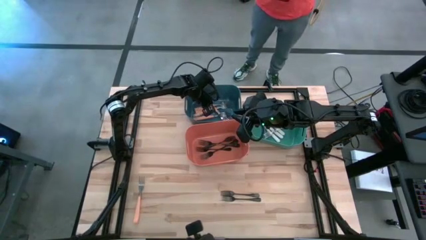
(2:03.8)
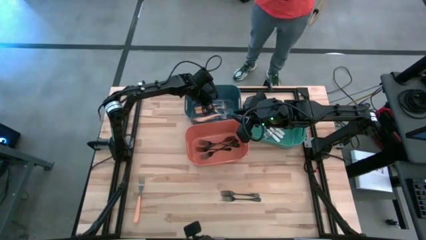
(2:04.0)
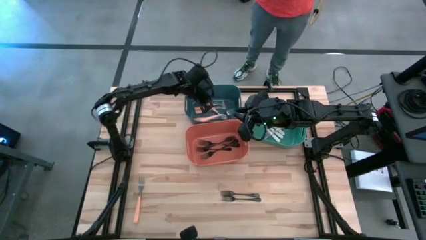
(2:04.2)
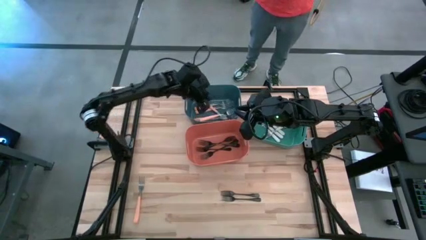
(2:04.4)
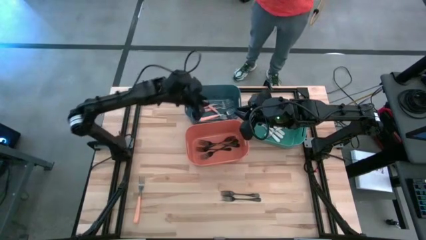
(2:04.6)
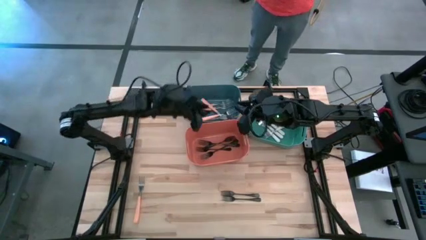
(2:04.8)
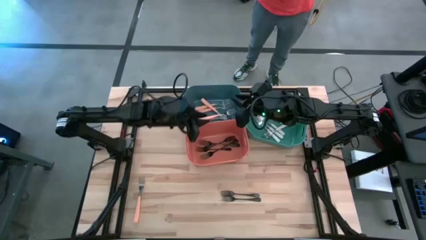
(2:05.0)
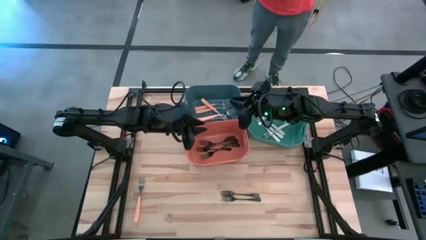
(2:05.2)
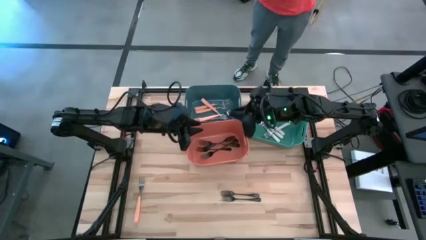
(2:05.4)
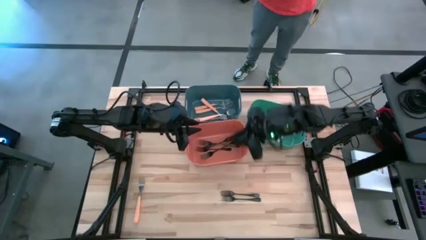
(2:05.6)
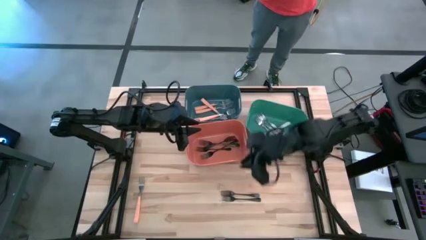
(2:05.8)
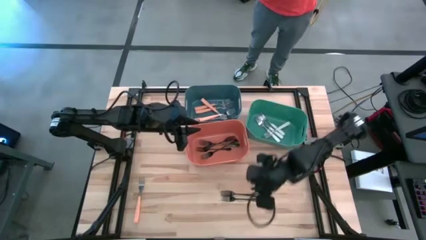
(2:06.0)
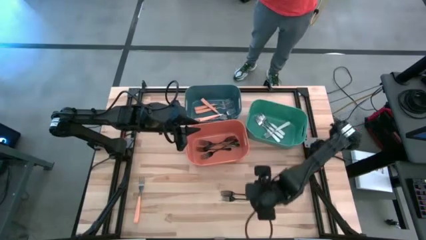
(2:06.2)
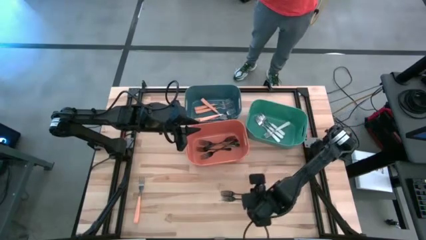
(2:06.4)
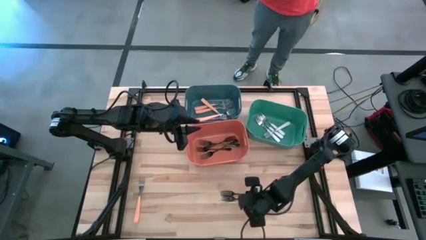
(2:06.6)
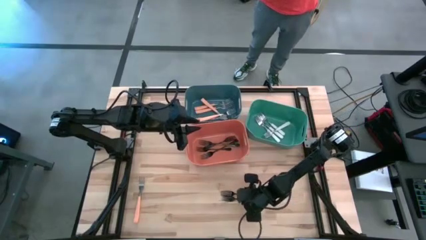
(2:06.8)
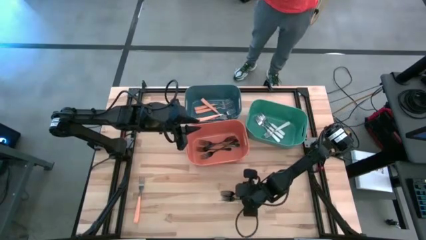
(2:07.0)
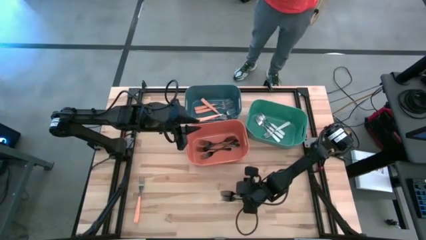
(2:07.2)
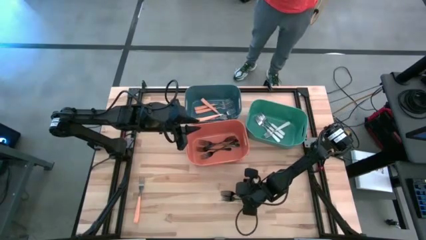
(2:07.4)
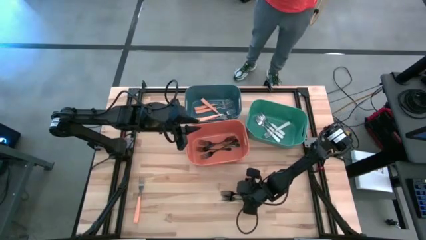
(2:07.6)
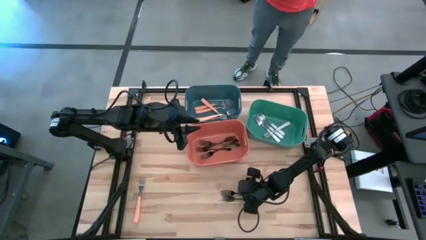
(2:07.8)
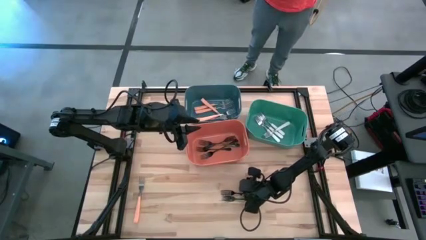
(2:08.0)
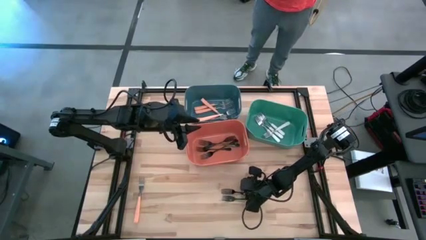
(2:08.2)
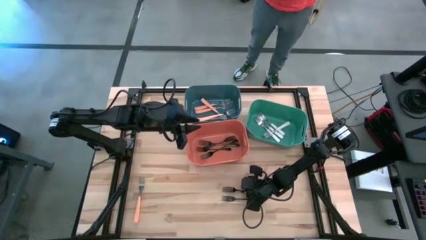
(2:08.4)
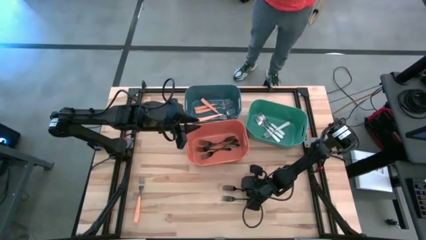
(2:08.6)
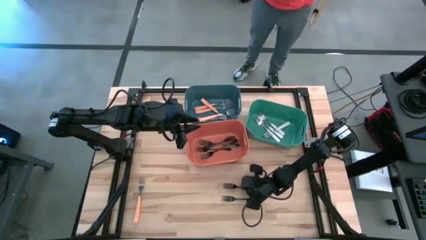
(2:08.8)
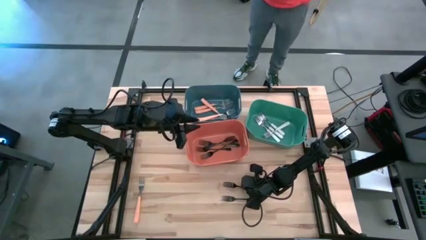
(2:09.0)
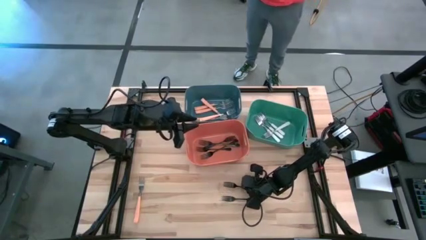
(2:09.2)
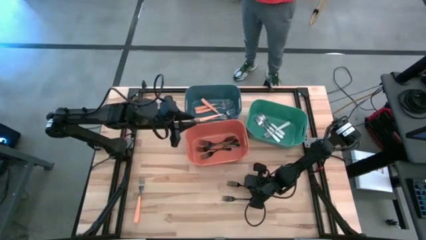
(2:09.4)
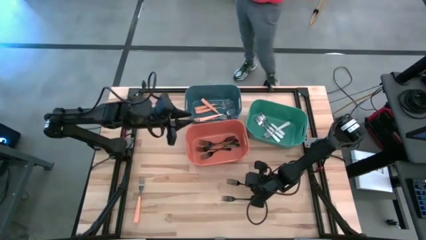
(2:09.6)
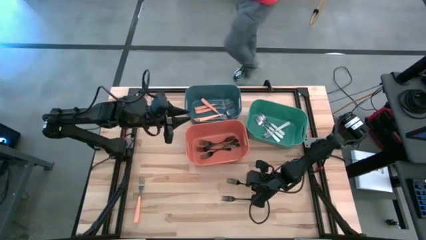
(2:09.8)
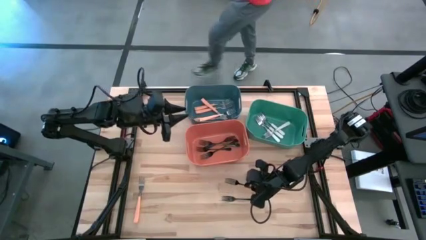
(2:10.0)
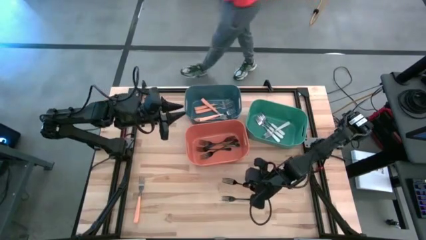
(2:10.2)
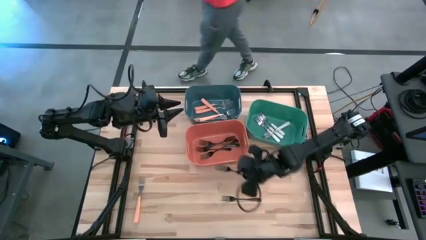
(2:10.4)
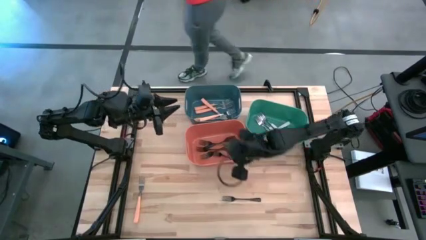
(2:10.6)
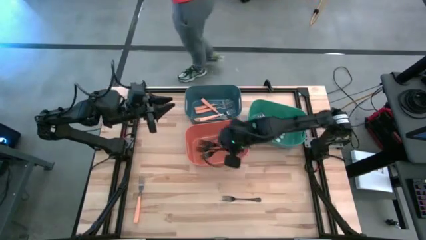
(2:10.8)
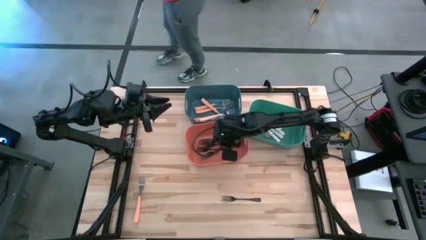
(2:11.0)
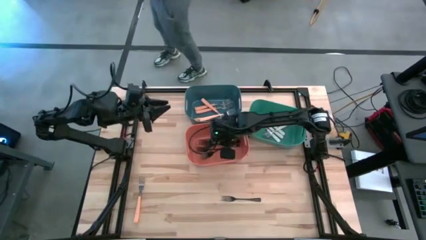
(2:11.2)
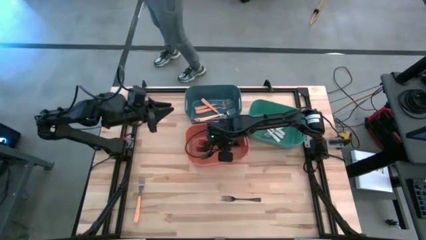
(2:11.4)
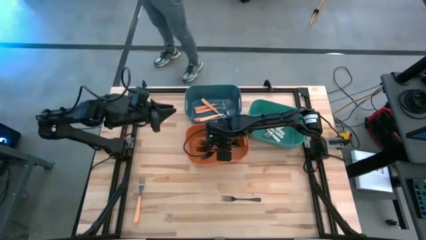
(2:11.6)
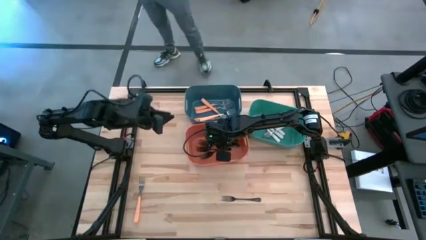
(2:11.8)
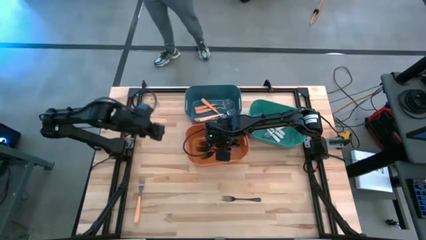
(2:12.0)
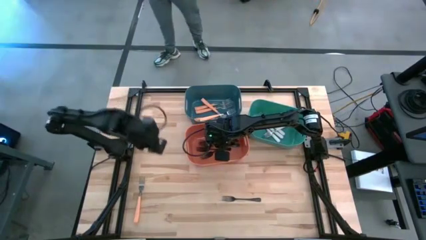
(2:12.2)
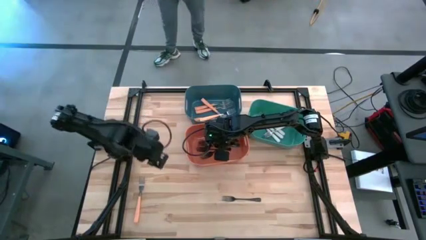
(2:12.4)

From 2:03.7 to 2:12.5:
Task: Sort silverware by color (type)
Put the black fork into the orange bin

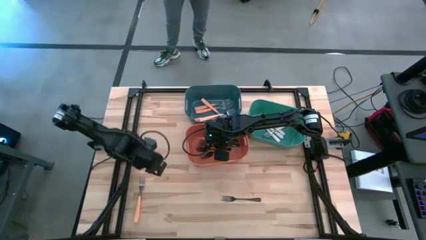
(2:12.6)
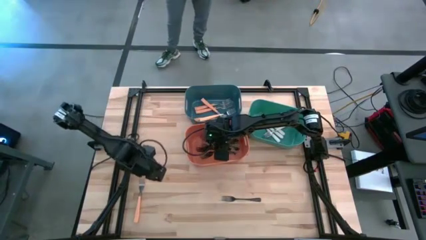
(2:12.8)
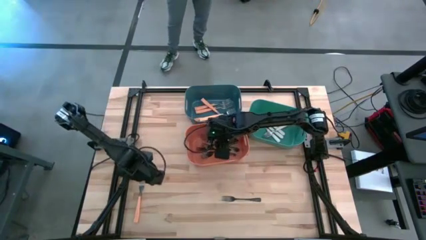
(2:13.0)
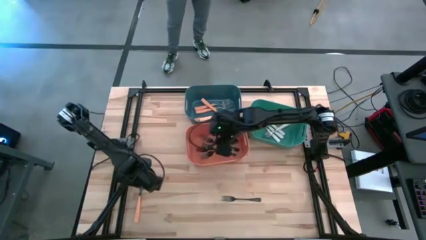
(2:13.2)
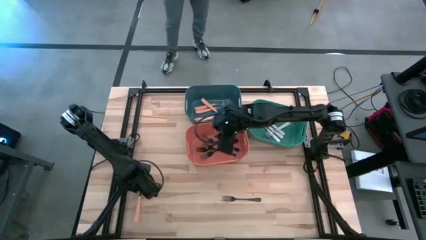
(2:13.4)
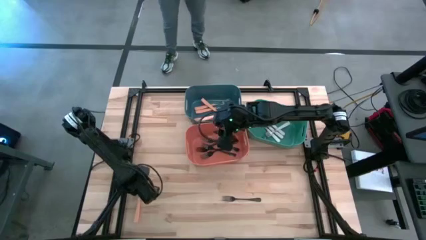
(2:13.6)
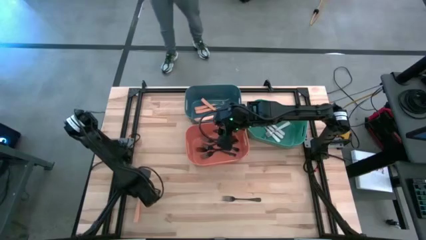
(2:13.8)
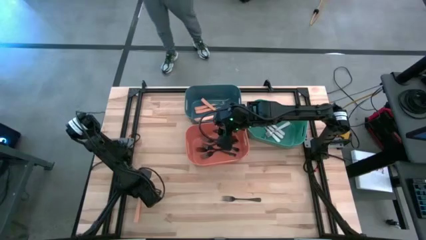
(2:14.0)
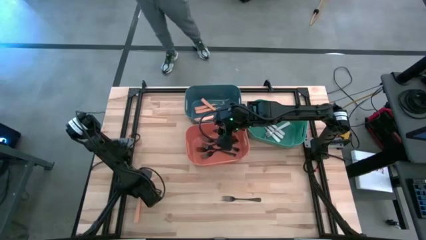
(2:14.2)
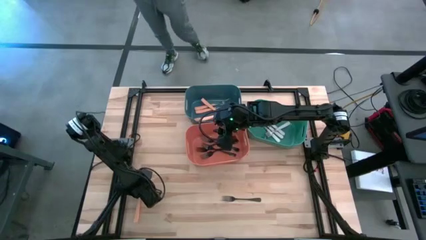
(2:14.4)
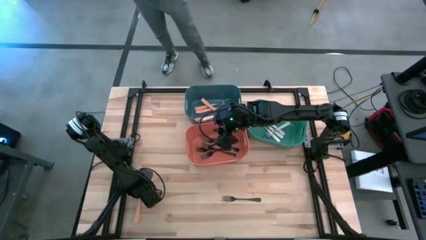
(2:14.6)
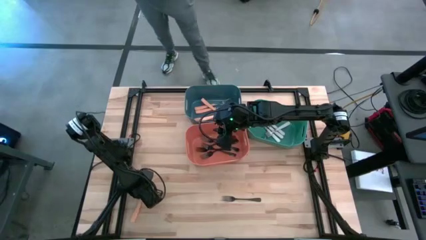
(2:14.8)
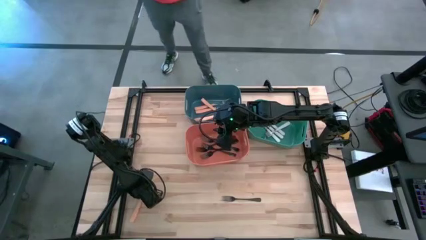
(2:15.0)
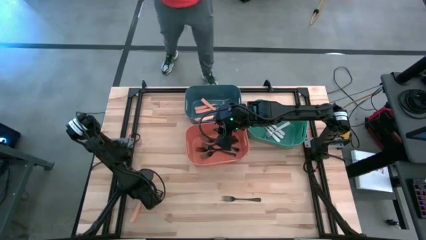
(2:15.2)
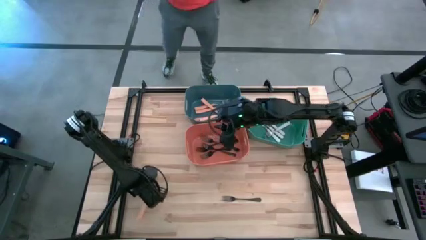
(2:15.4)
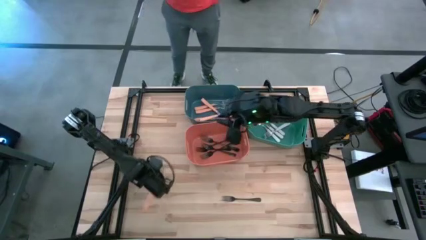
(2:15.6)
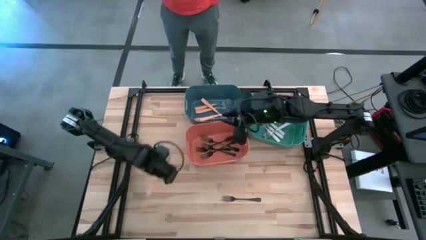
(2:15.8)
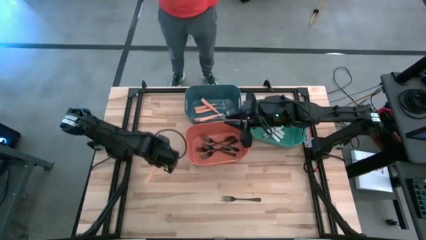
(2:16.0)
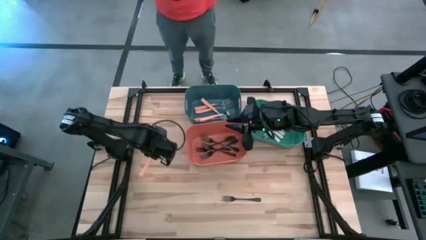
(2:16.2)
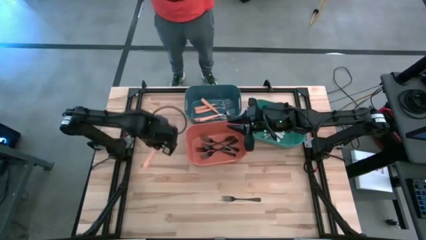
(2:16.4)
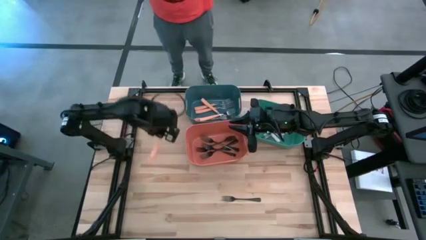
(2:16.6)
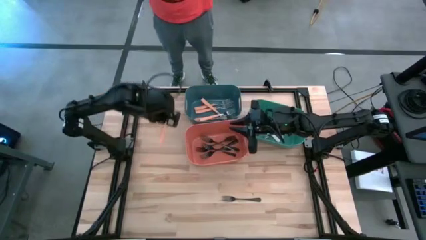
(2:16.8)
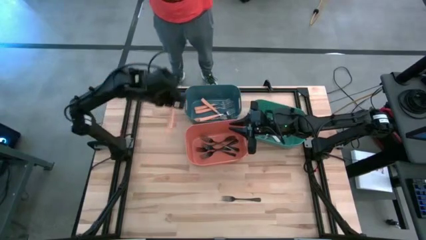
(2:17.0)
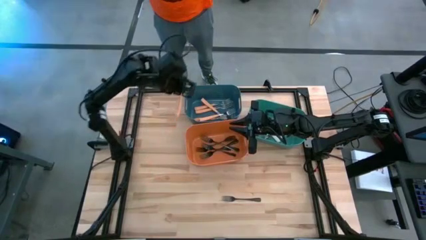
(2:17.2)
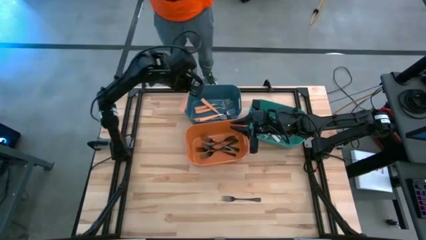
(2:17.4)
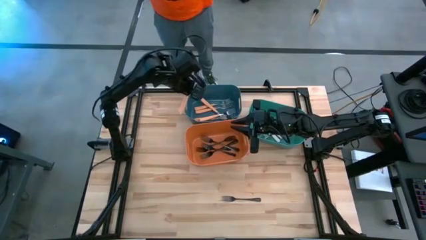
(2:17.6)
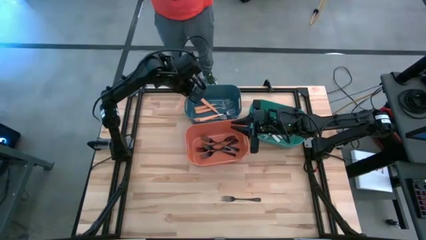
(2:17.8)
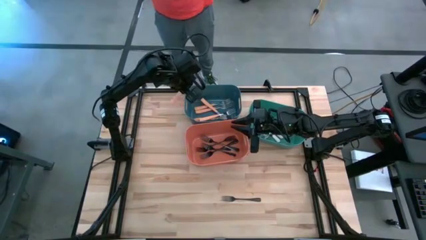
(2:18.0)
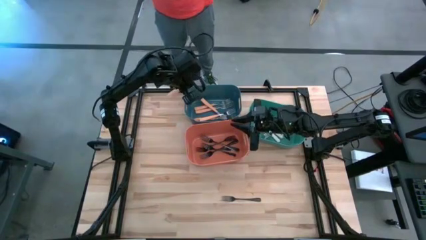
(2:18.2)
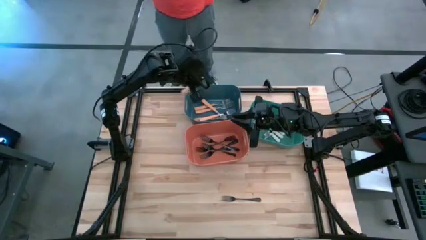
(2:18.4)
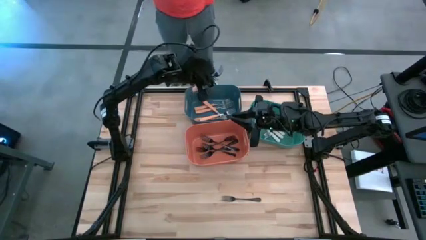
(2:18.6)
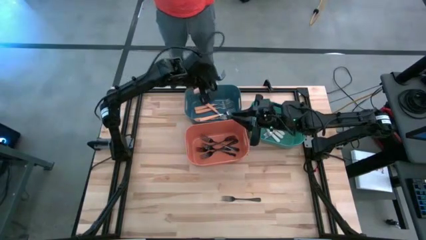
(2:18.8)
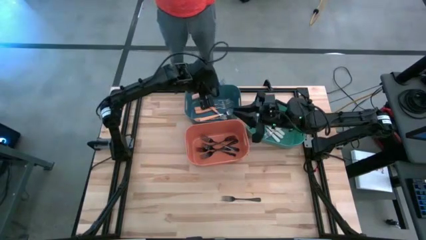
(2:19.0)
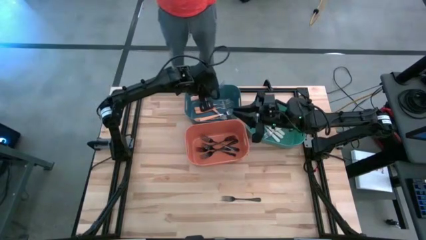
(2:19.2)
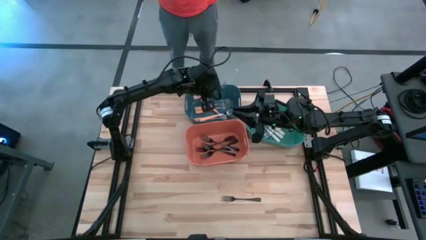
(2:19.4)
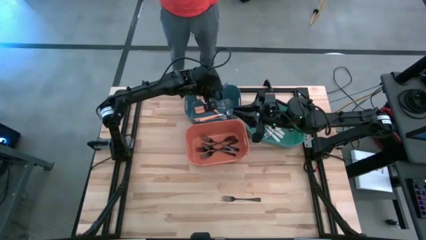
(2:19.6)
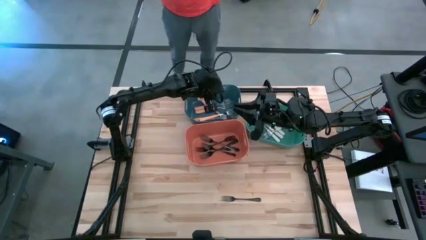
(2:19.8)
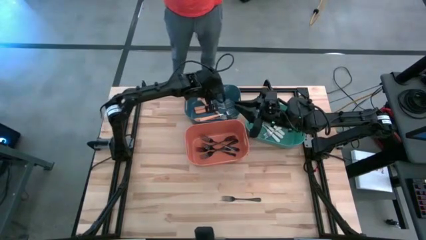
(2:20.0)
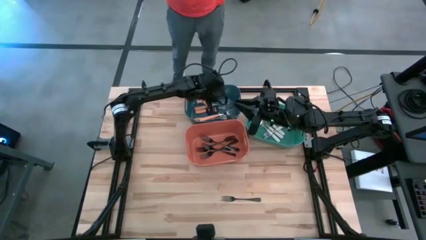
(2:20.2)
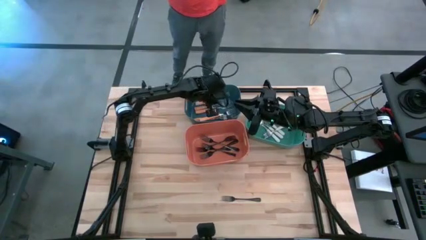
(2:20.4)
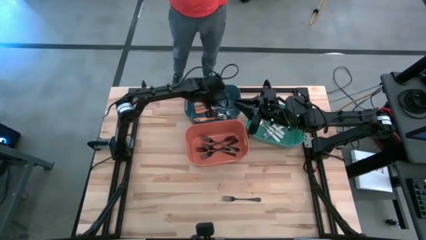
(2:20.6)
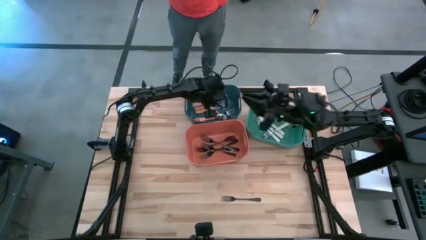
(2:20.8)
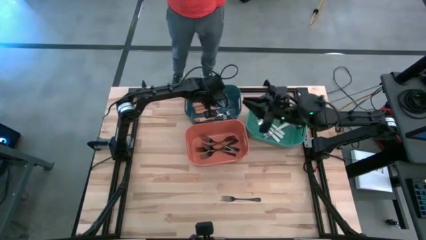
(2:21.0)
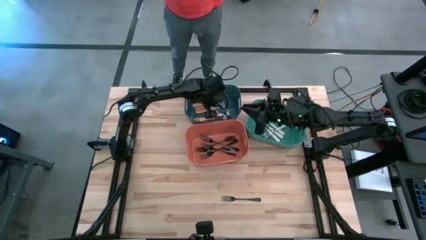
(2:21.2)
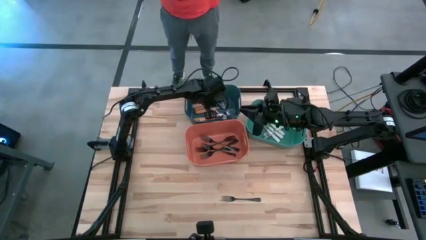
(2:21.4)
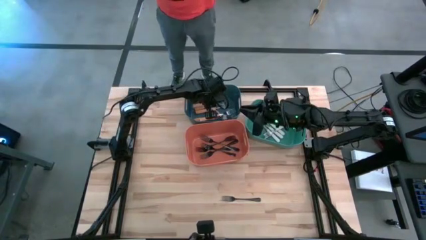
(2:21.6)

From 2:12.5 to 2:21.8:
Put the orange fork into the blue bin
